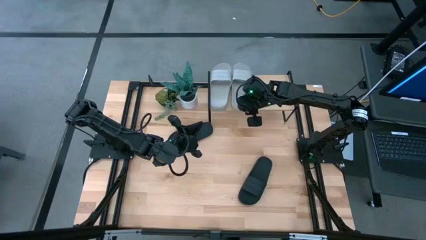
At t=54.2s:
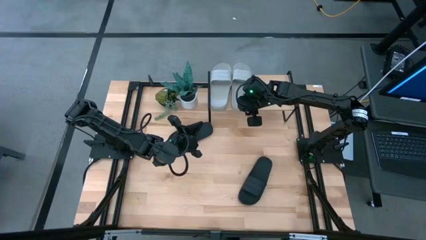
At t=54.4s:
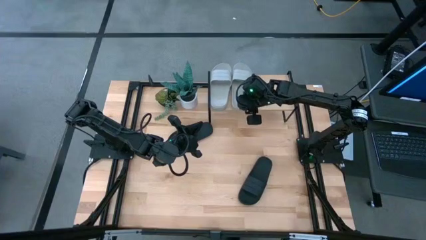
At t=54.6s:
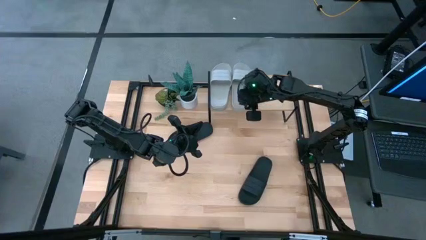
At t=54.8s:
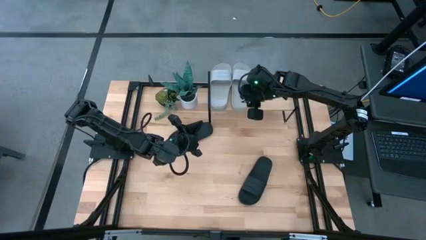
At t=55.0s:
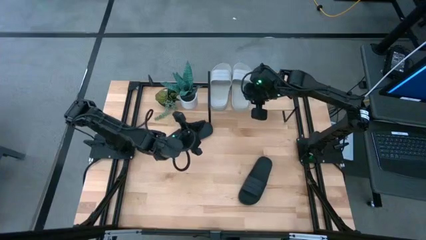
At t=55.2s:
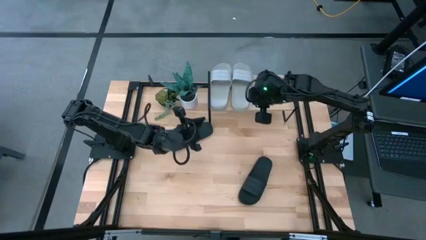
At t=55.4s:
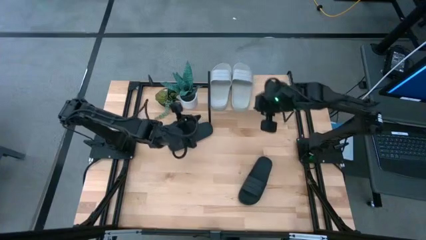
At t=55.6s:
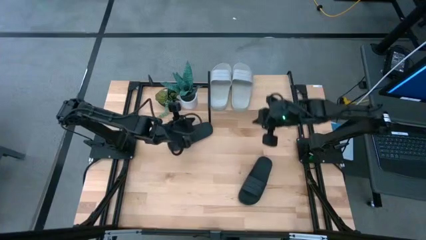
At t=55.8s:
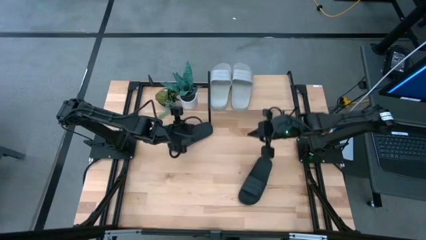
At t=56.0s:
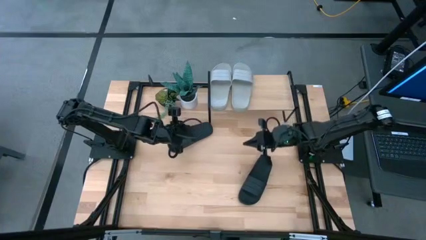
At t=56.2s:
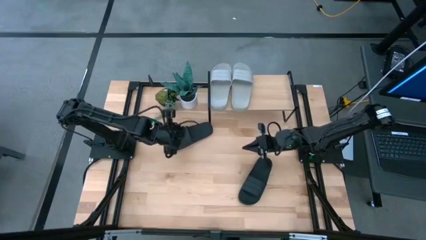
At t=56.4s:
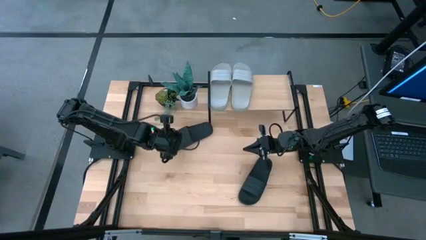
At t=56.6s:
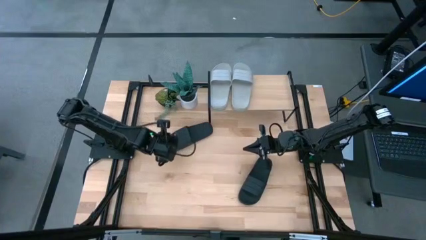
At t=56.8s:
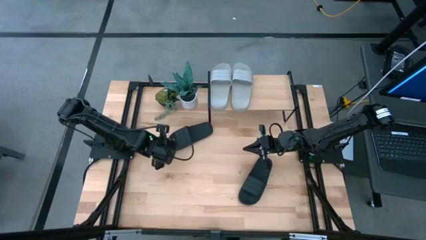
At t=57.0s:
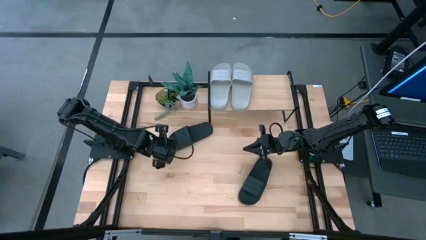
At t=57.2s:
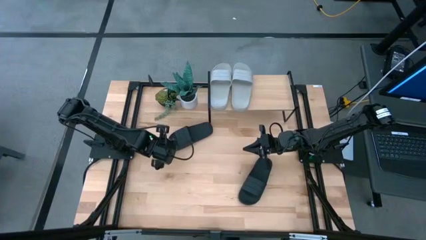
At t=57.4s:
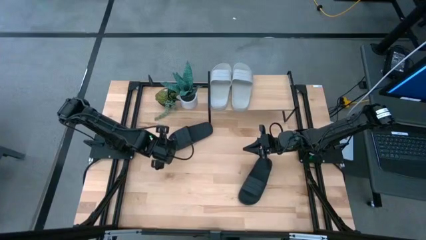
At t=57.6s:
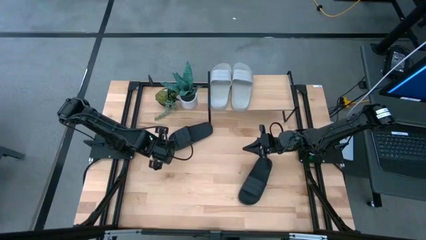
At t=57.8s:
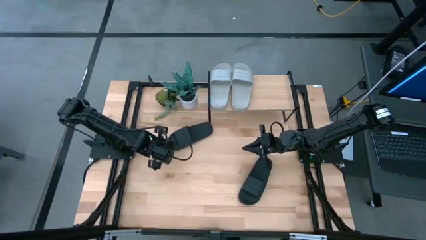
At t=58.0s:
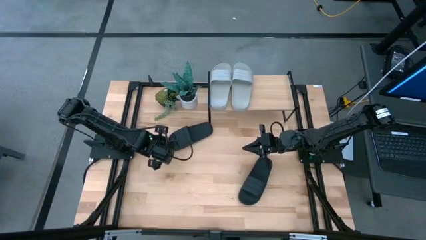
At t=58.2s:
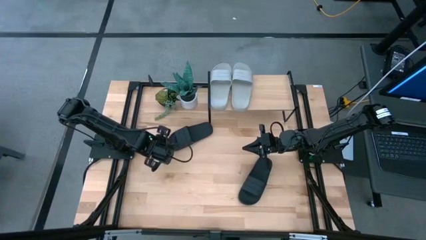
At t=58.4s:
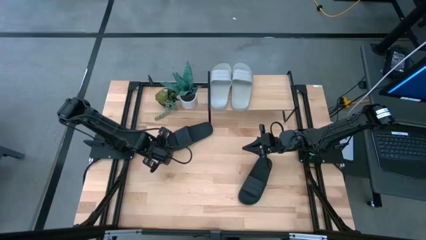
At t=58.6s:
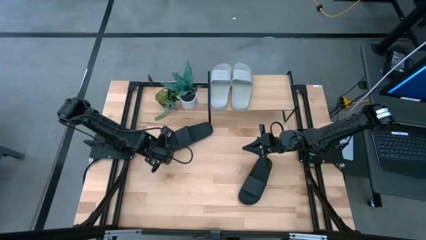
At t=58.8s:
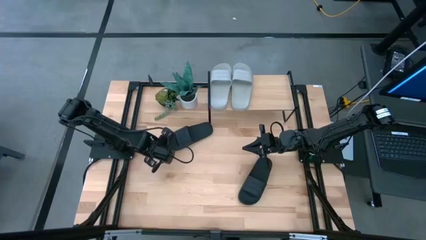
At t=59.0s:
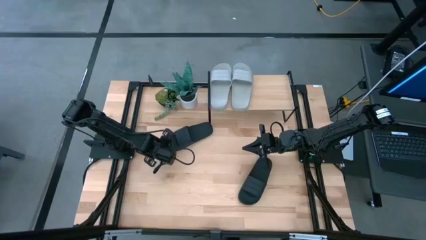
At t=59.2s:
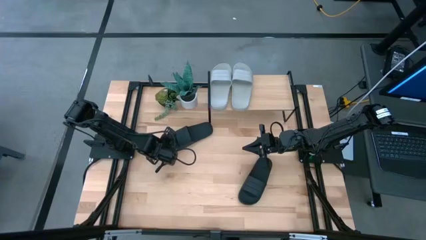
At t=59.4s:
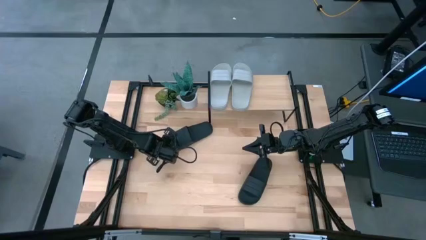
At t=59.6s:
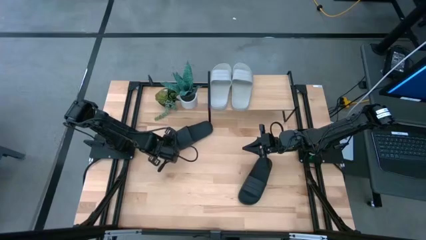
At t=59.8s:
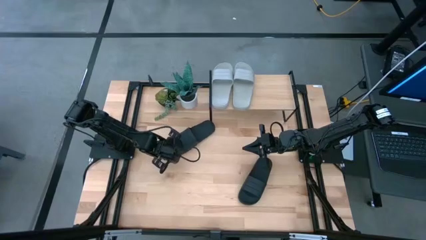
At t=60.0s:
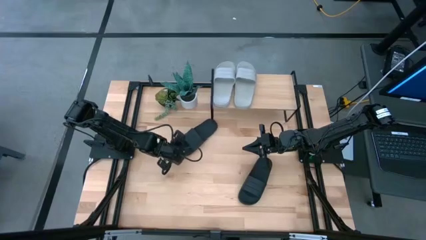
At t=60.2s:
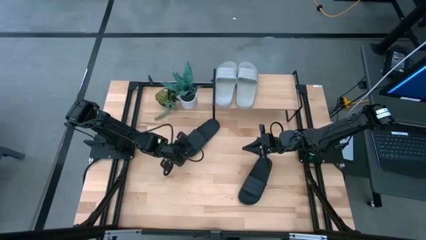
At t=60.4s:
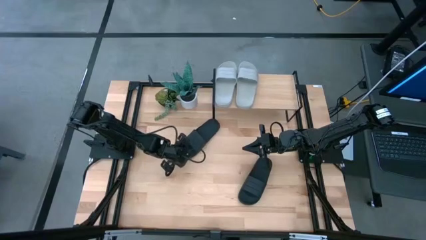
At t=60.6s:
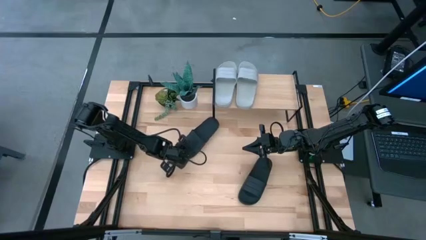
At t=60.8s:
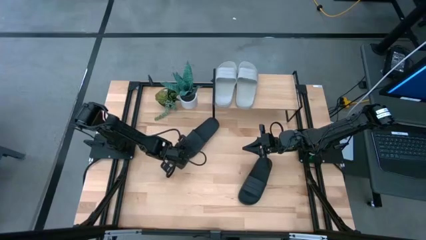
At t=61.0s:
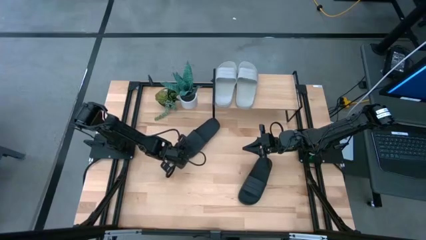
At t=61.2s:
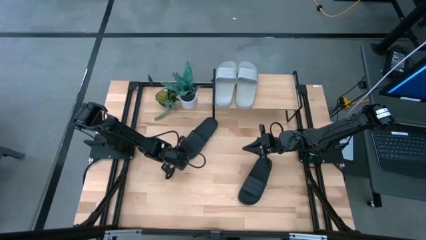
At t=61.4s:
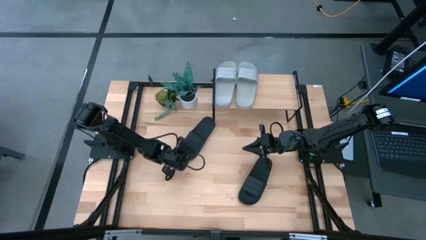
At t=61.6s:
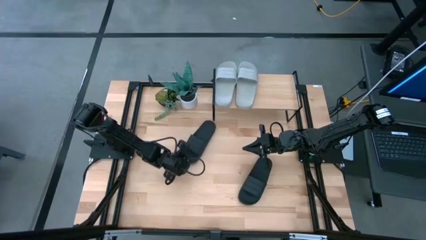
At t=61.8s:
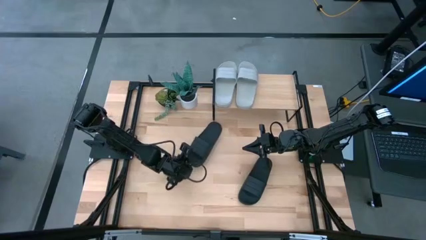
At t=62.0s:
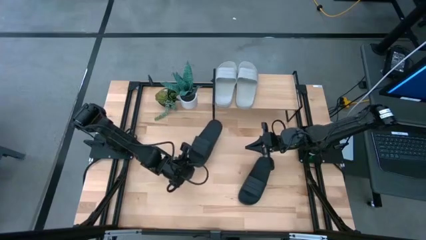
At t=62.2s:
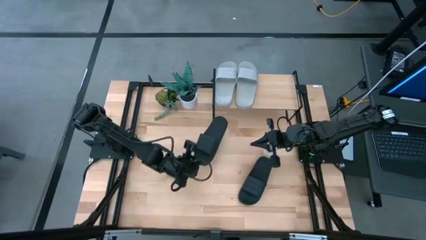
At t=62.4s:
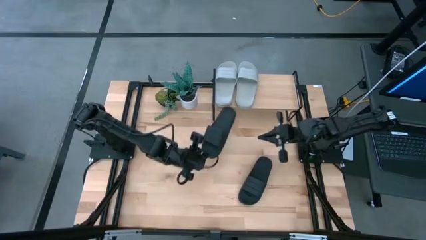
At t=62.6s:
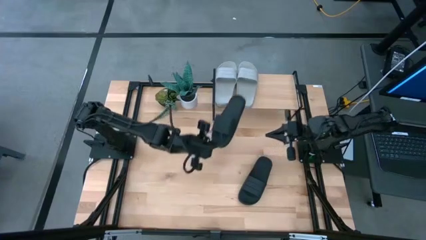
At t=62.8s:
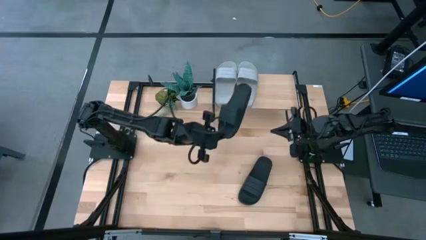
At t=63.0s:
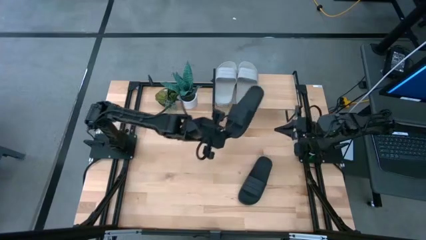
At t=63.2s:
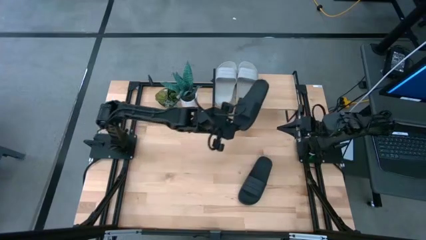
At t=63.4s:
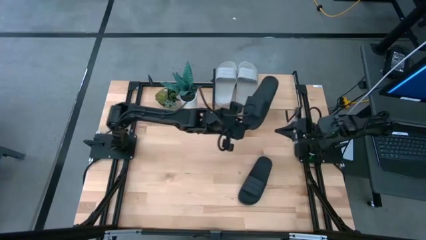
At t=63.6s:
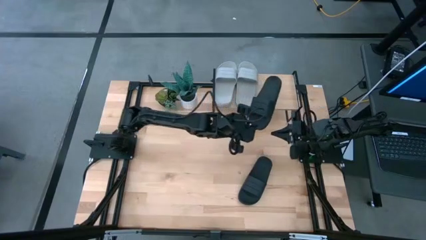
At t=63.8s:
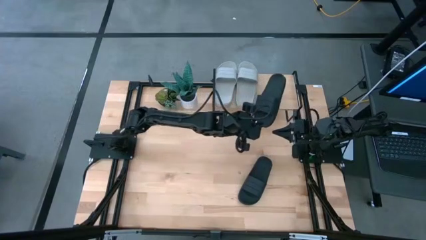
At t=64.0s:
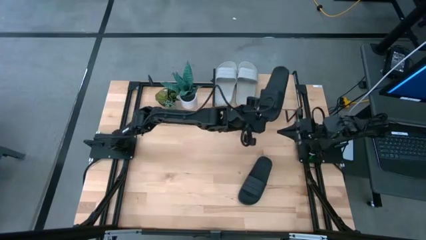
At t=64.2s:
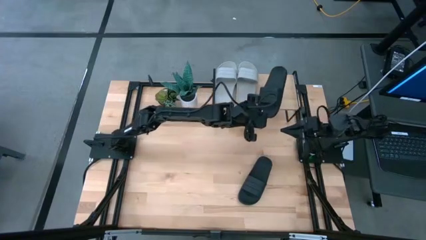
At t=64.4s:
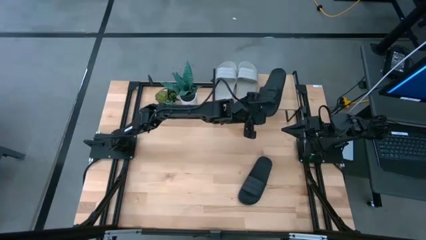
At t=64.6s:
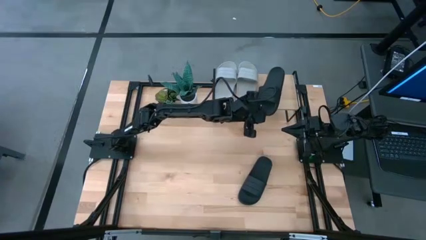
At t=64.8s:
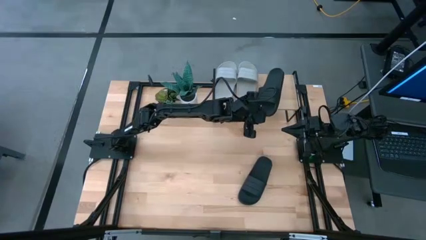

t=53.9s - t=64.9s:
Task: Pick and place slides into the shelf
Put the top black slipper on the shelf

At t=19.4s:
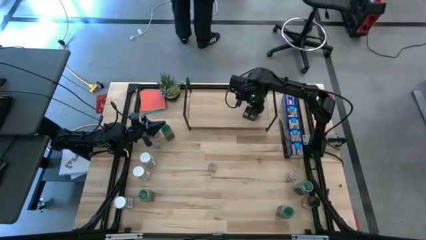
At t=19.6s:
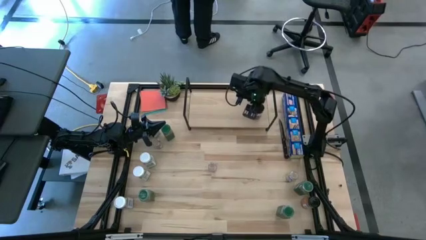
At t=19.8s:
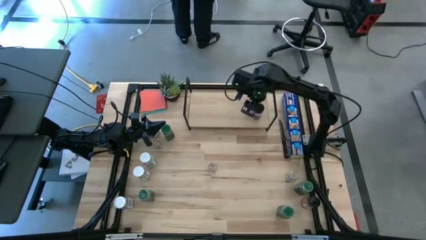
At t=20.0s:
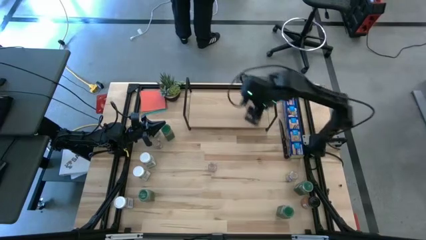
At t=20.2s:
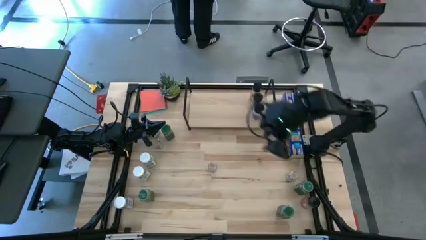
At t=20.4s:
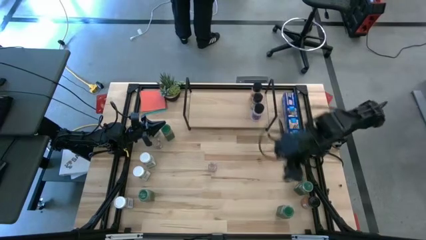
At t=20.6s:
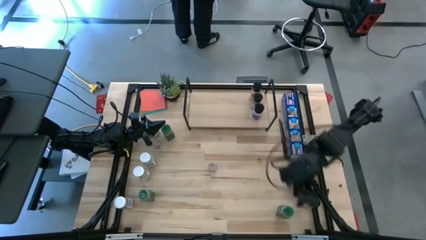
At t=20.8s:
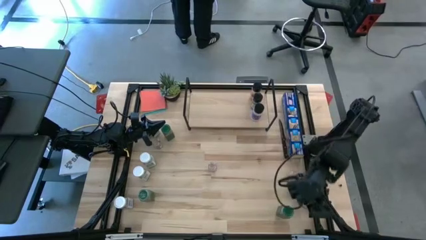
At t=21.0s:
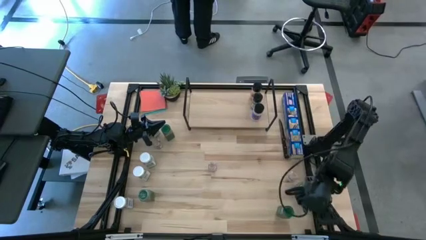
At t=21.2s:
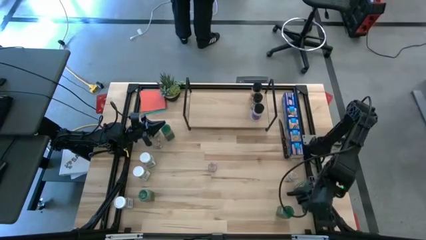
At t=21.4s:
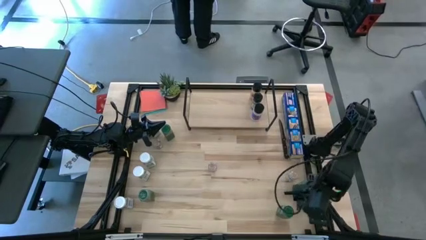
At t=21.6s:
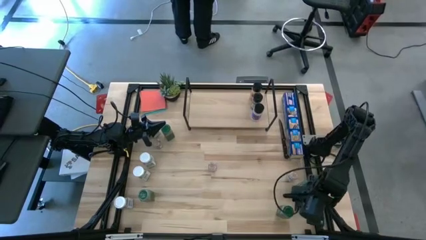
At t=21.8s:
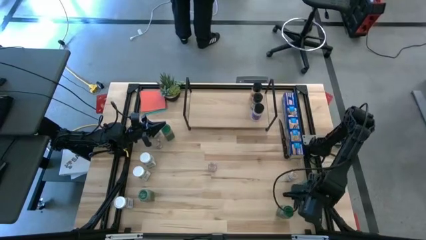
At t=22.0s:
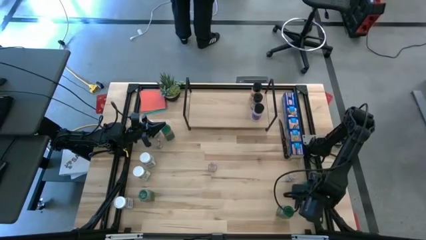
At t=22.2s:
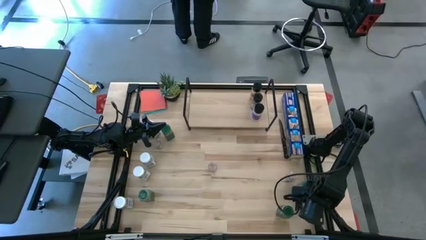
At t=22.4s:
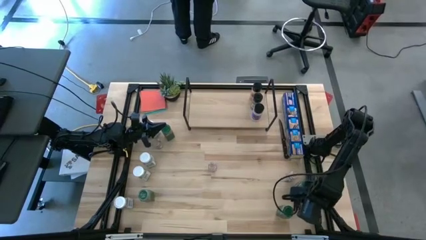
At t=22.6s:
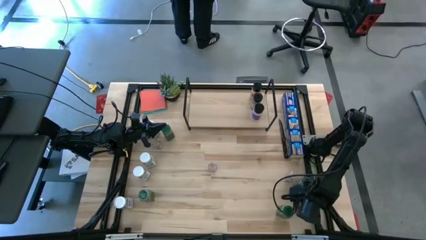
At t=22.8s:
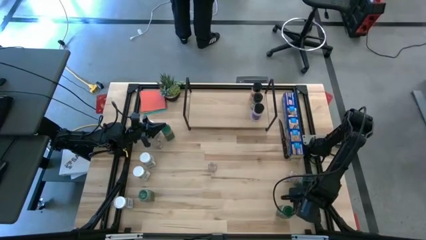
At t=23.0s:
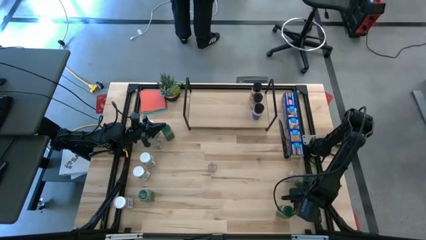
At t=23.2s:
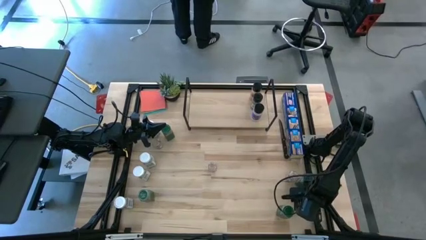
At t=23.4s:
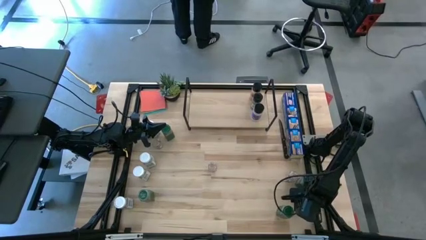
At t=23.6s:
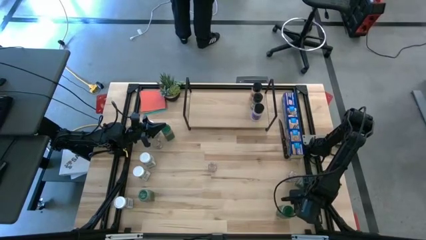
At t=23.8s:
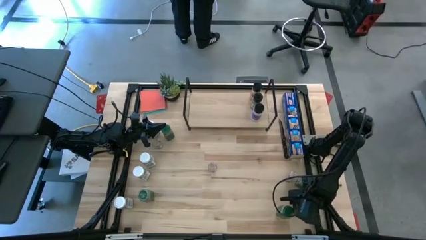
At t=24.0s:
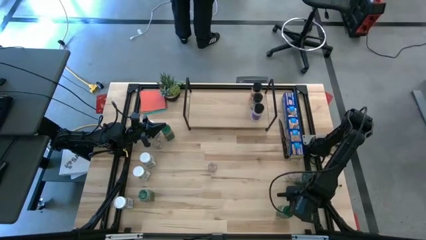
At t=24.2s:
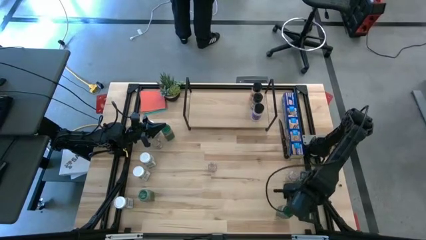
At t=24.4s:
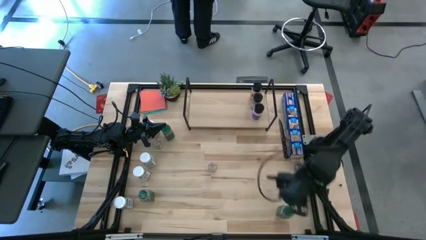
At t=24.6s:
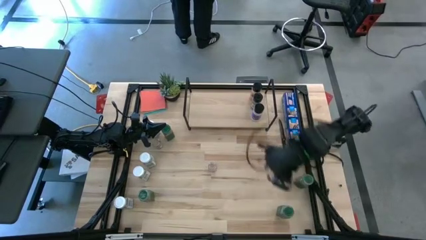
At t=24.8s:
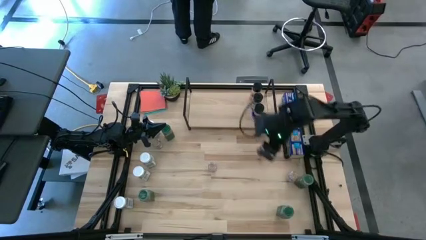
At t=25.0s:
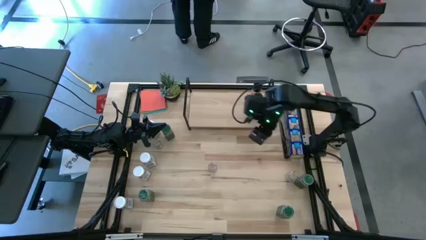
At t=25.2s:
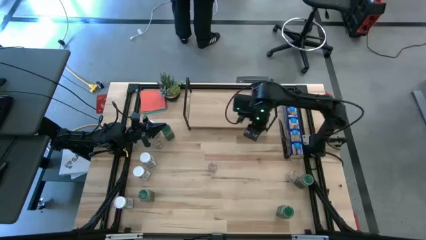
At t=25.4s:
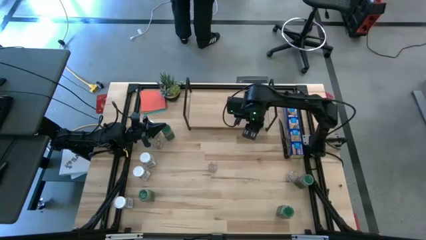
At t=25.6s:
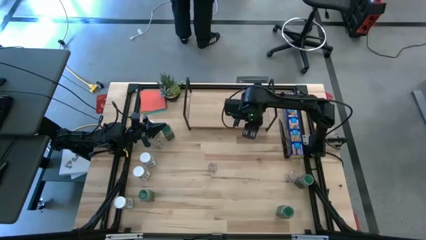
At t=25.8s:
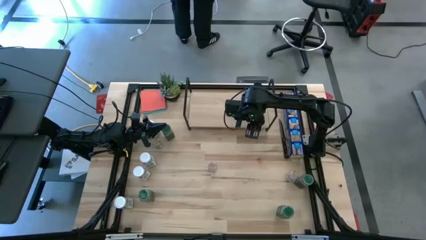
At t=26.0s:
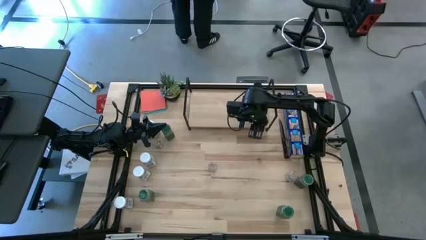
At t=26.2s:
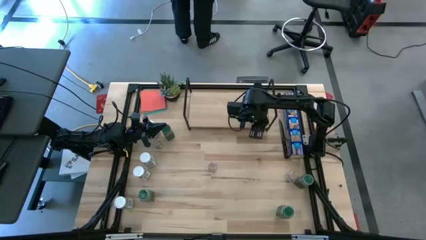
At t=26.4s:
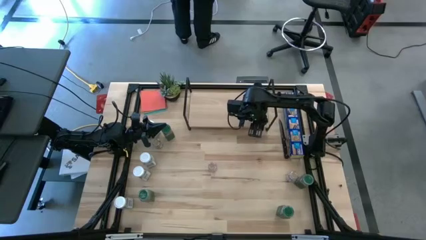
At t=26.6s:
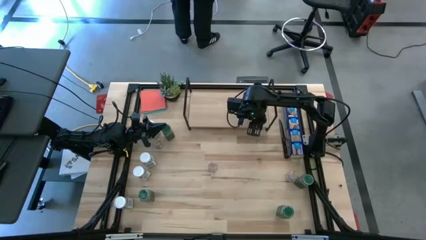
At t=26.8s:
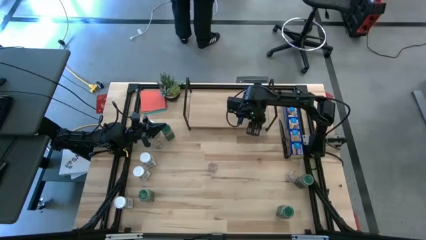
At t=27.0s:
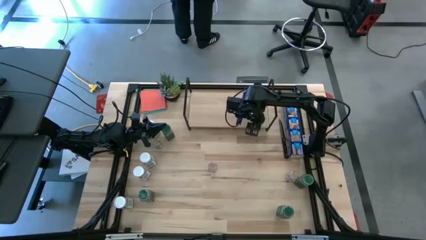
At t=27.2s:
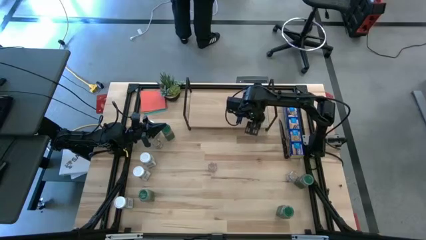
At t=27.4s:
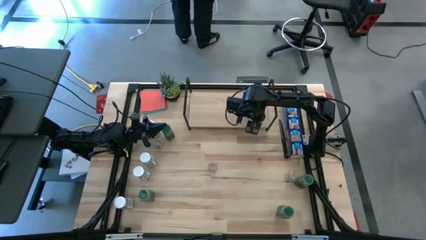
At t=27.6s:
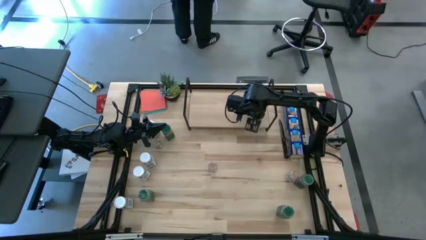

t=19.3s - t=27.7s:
Task: Shelf spices
Put the black orange seasoning bottle on the shelf, aligned with the black purple seasoning bottle
